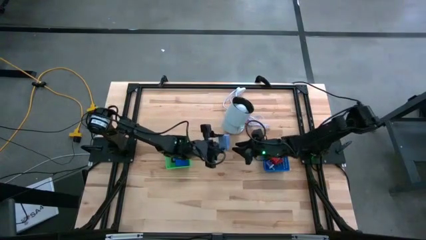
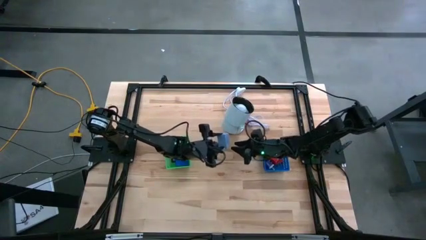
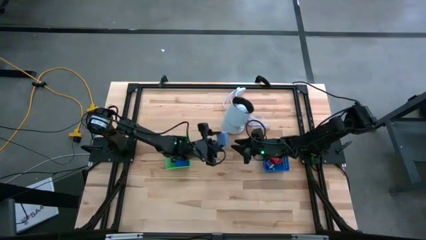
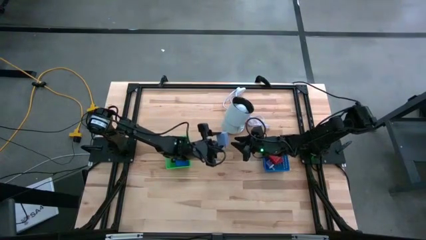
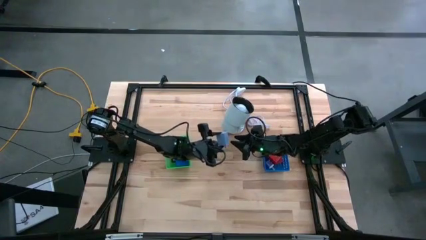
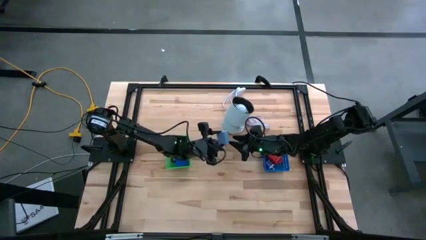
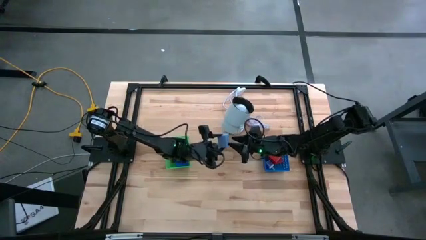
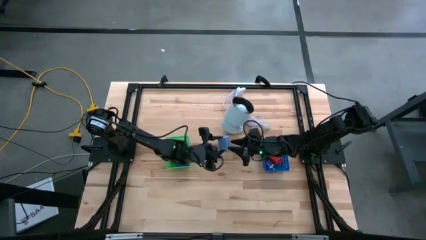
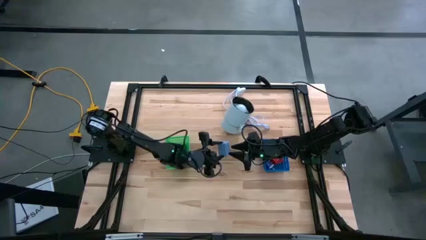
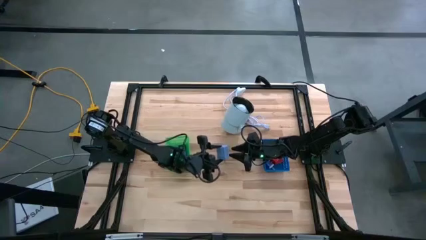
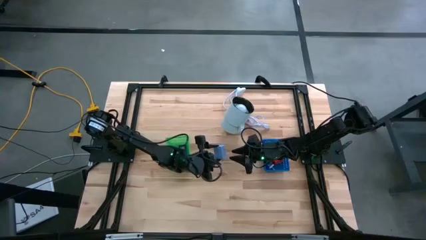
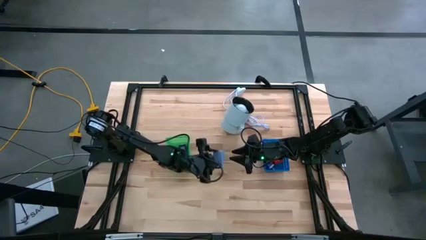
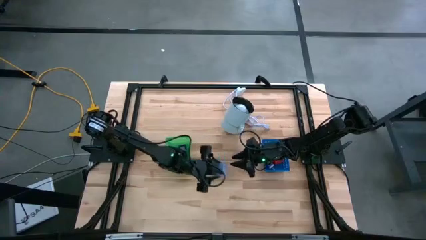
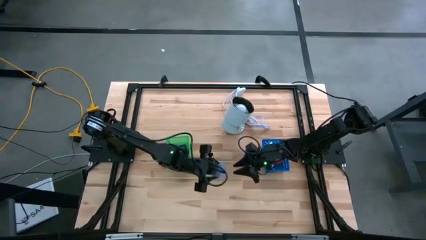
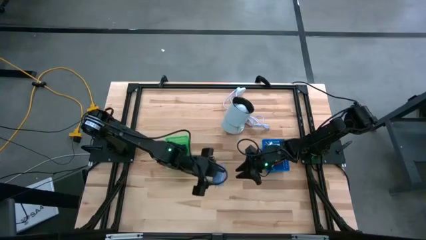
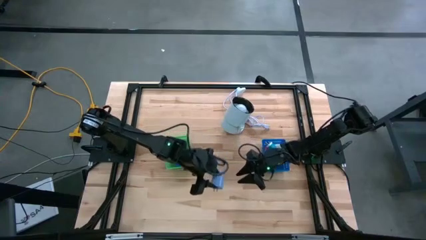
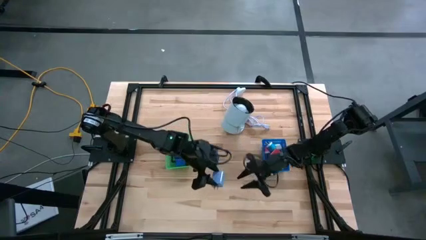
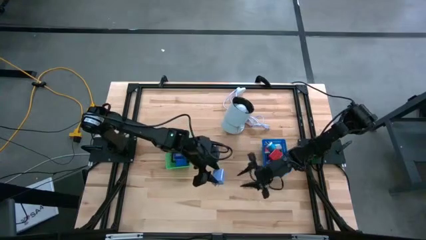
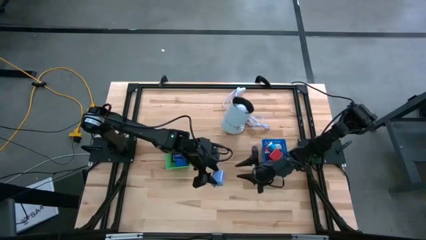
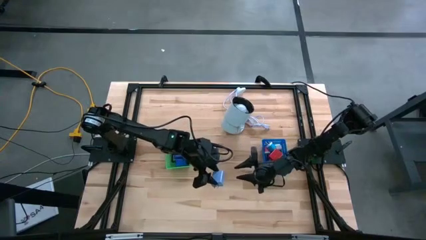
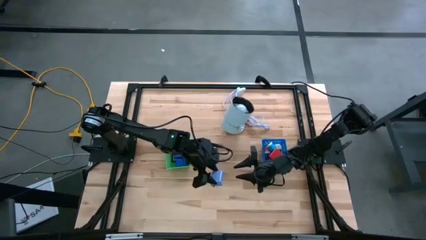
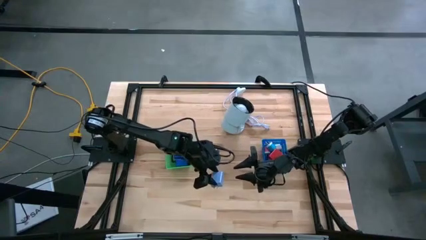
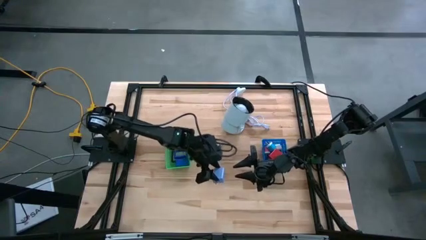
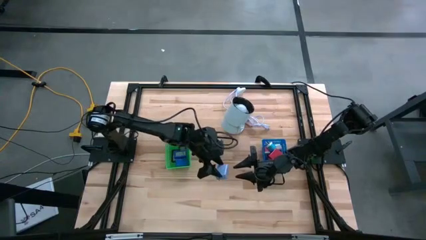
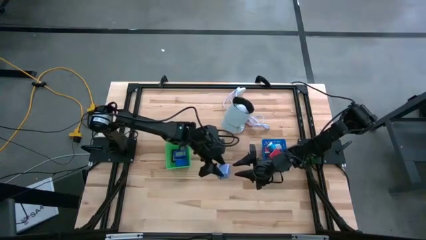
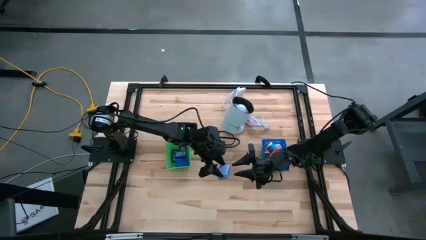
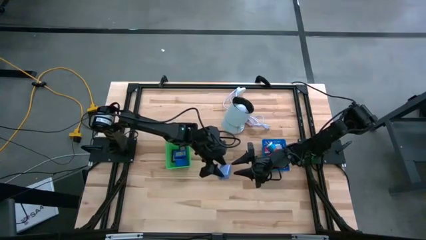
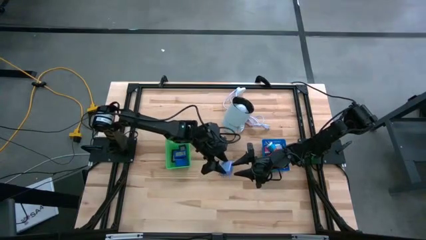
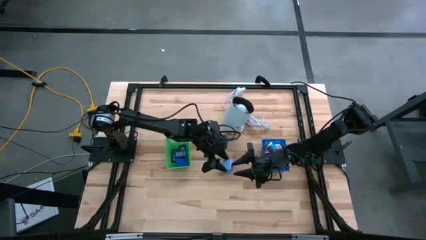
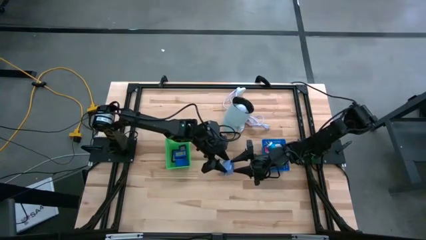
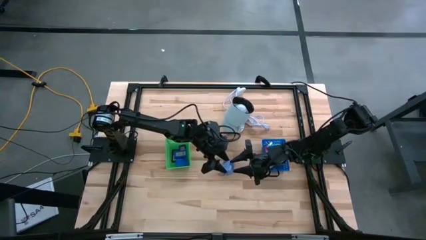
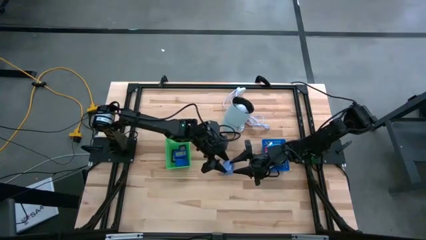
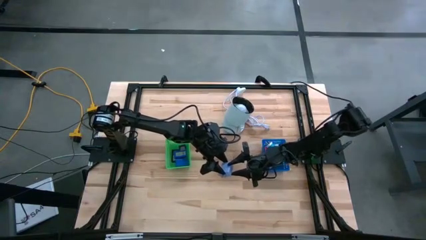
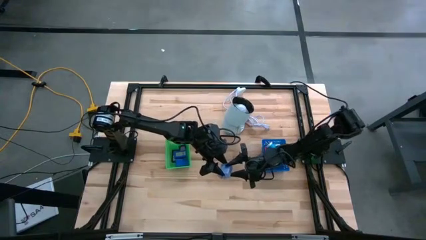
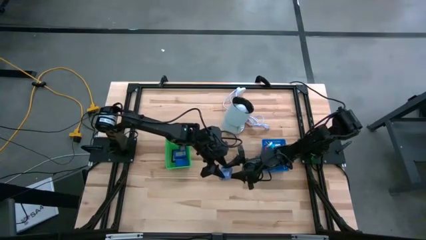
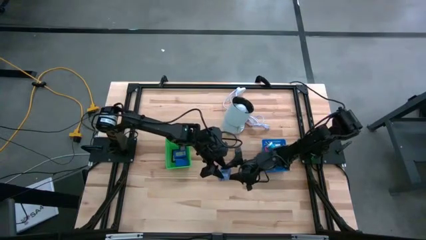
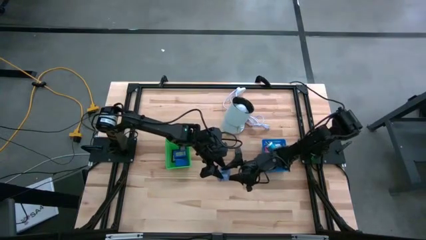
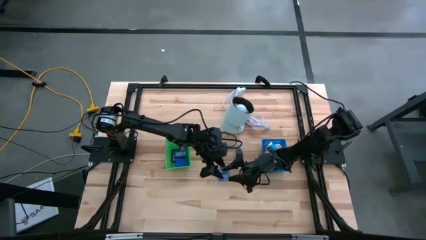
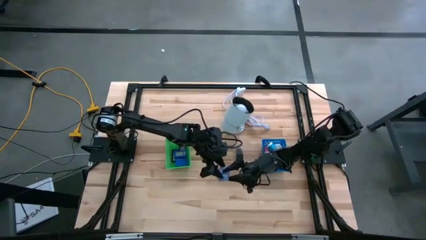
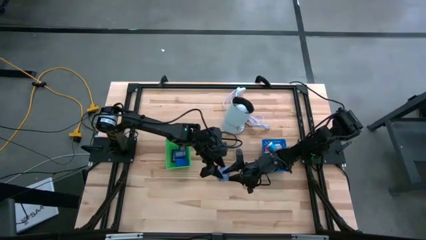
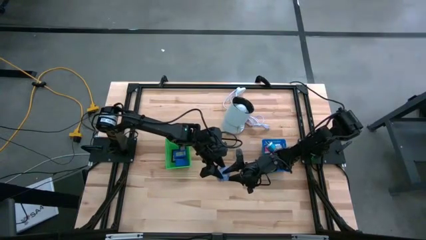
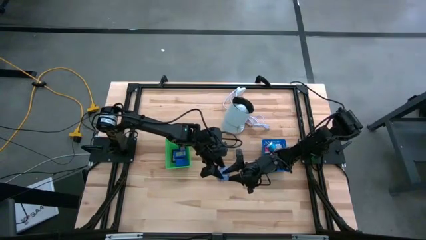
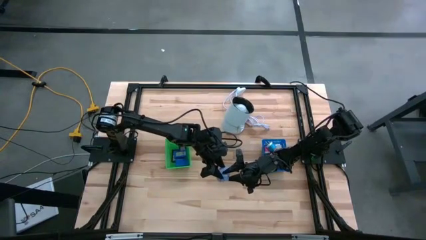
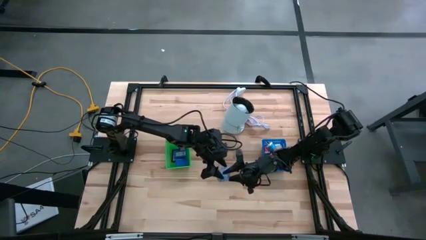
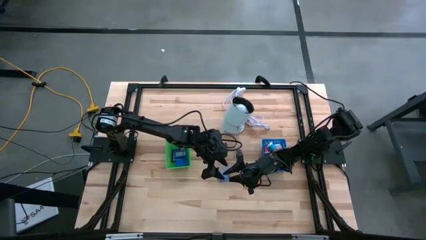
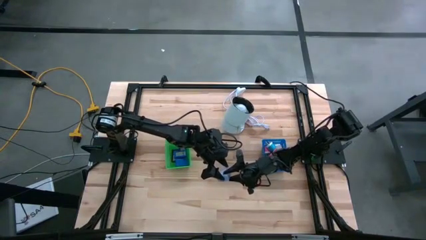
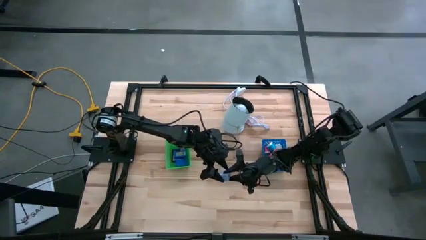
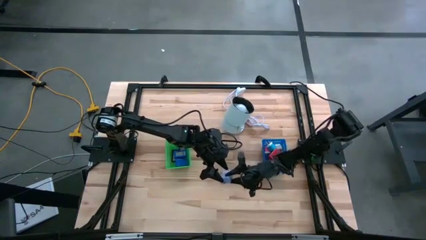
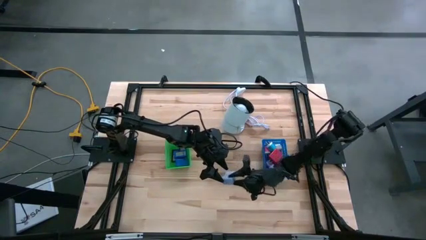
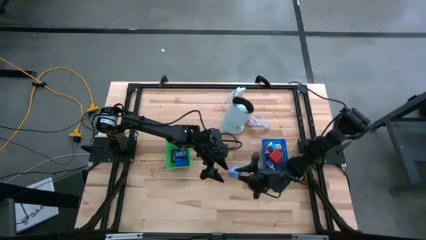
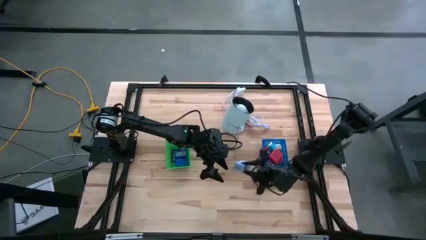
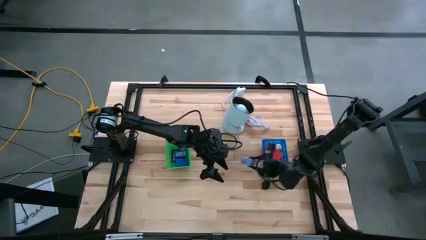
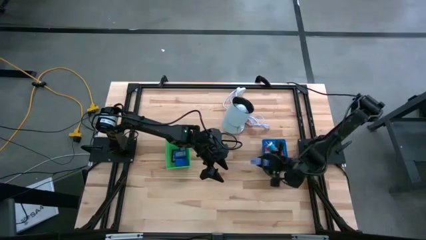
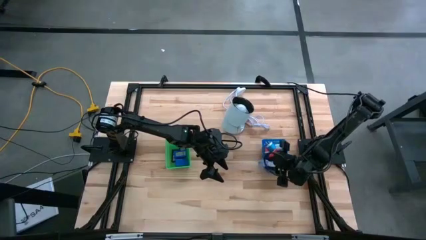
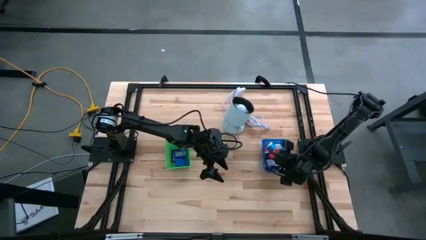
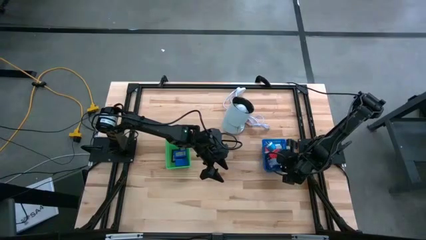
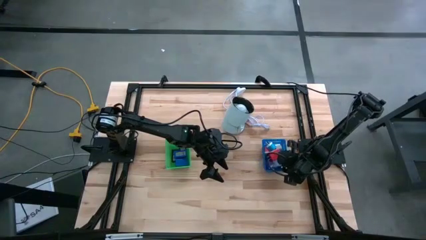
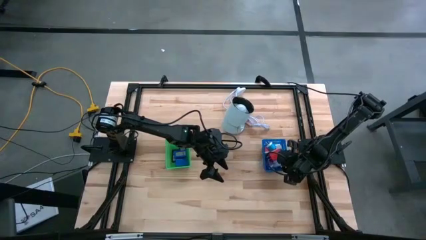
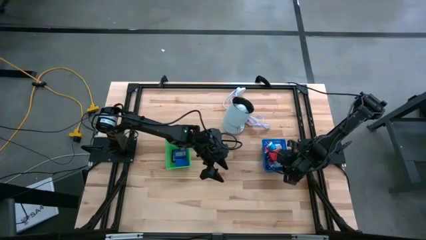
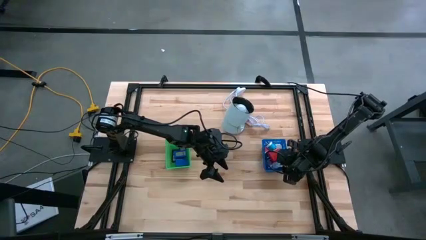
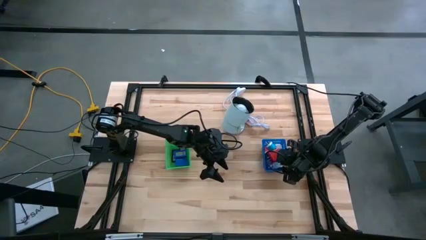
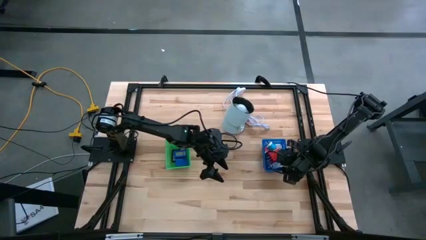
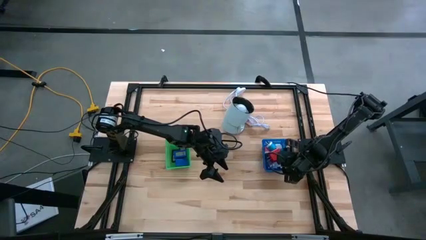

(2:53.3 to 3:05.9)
Task: Pick & Place Office items
Put the purple charger adapter into the blue bin

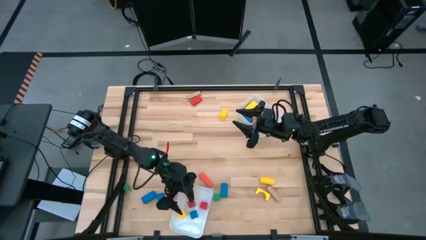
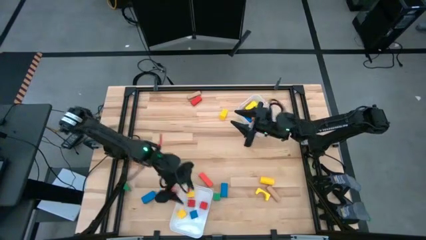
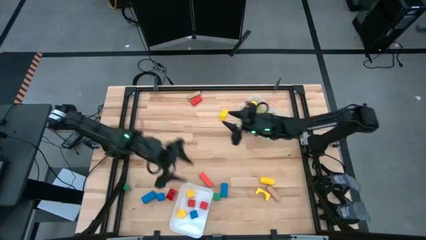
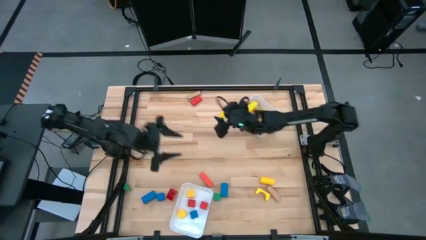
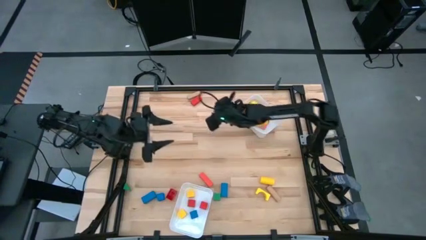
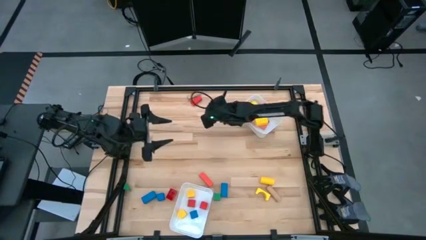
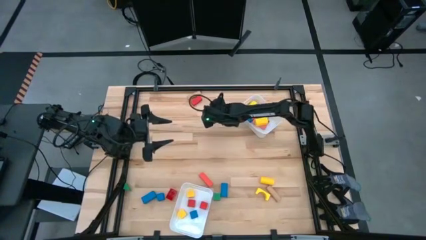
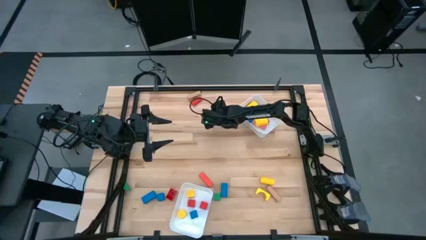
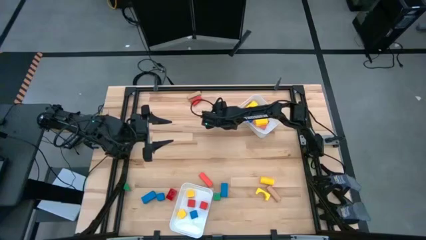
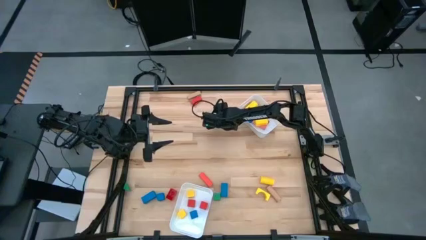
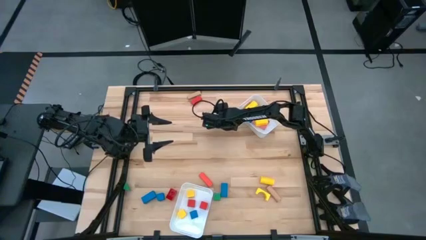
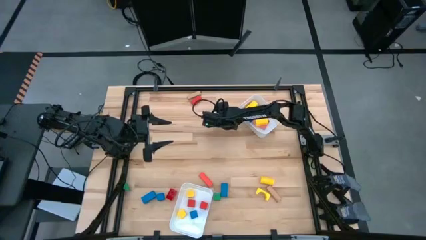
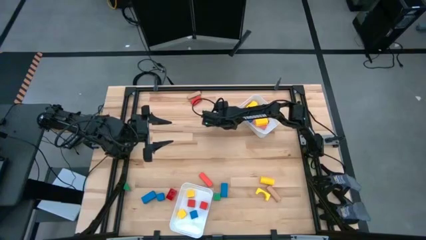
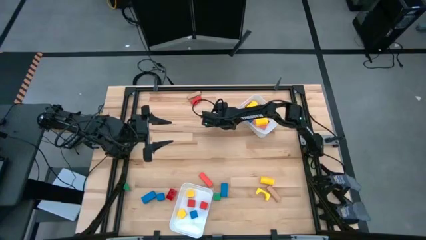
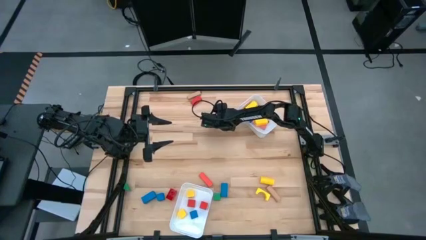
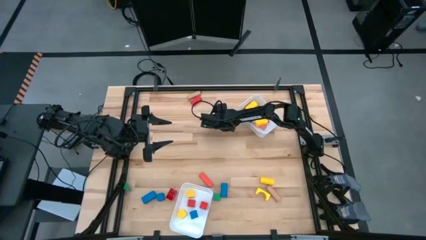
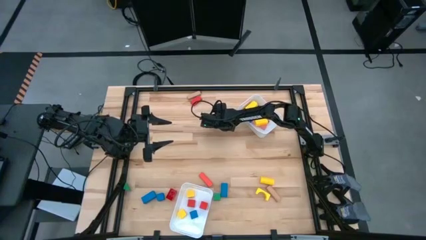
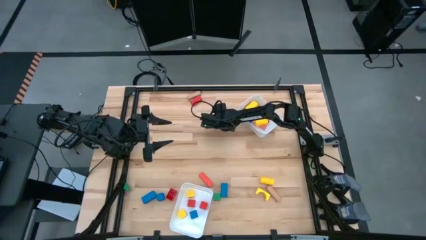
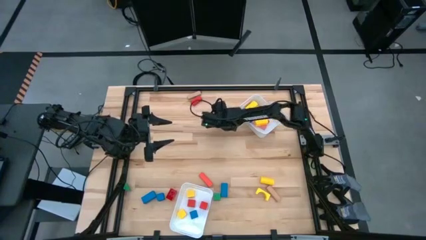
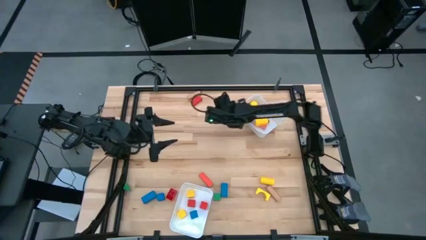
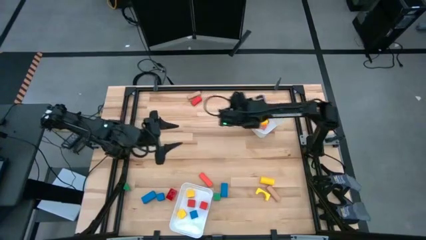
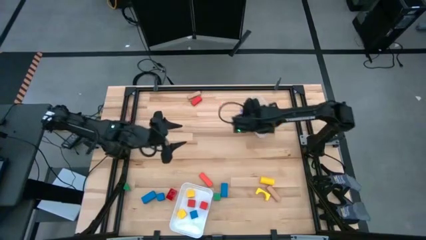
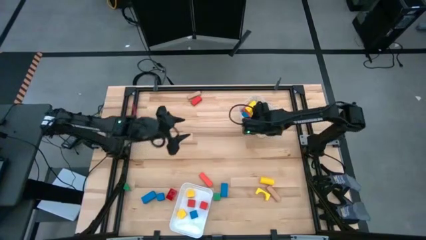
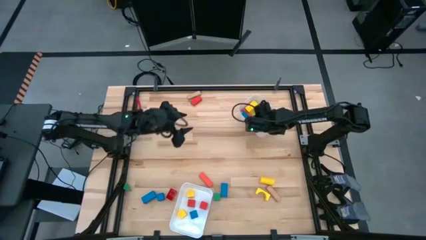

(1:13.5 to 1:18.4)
Task: Sort blocks by size
Put the yellow rectangle block into the top white bin
